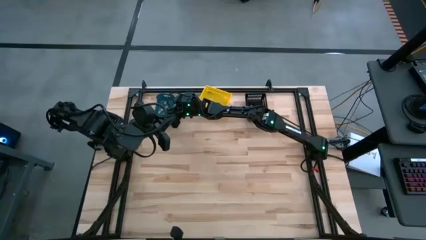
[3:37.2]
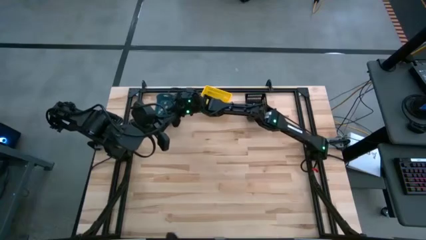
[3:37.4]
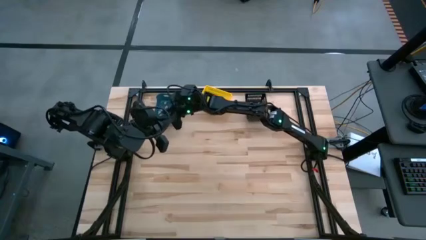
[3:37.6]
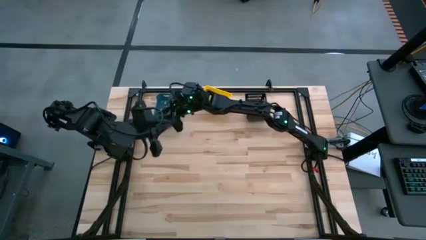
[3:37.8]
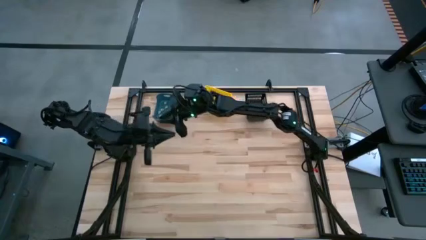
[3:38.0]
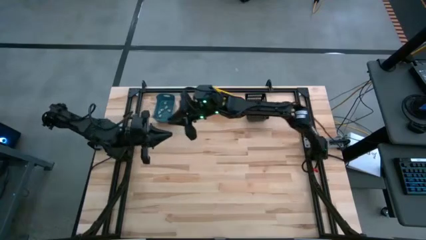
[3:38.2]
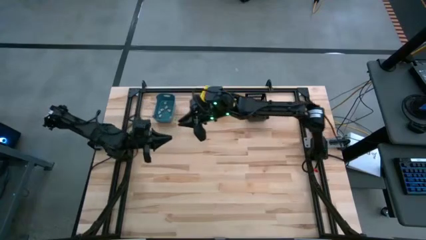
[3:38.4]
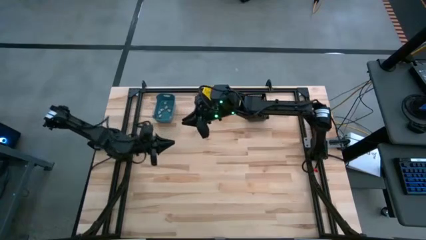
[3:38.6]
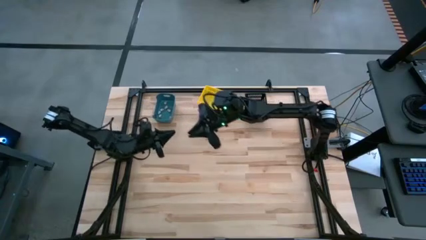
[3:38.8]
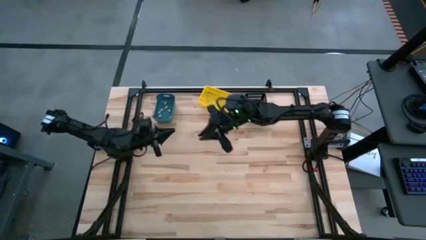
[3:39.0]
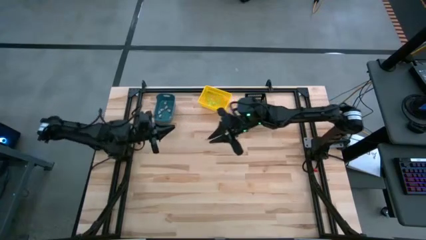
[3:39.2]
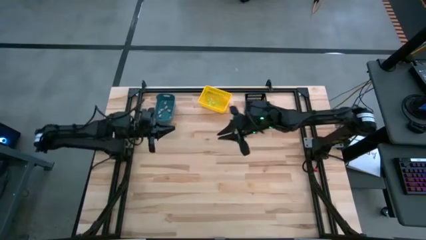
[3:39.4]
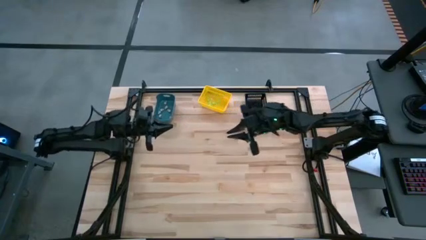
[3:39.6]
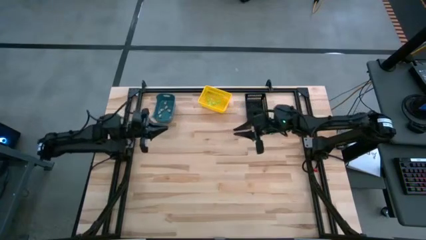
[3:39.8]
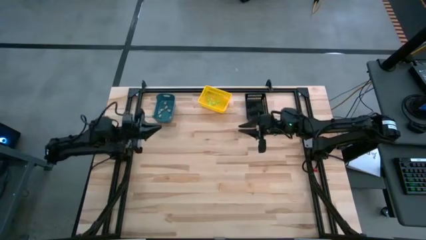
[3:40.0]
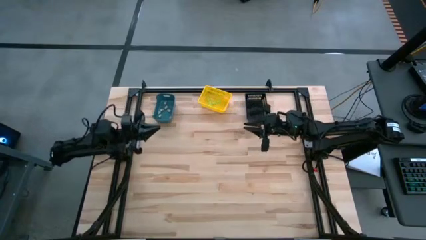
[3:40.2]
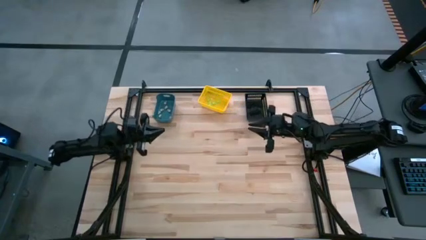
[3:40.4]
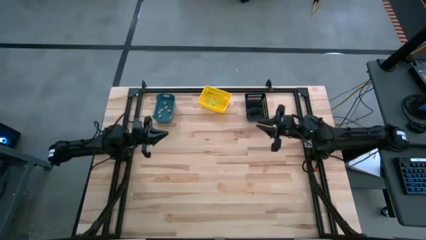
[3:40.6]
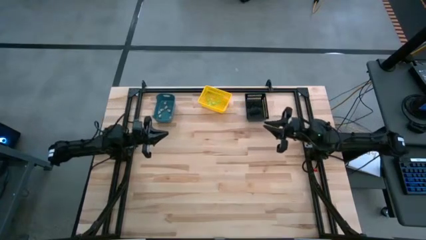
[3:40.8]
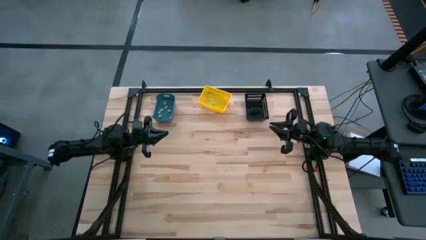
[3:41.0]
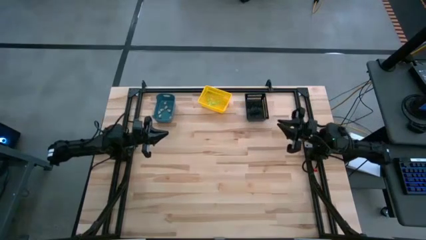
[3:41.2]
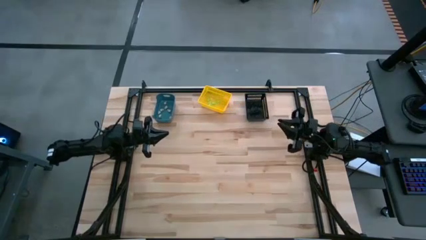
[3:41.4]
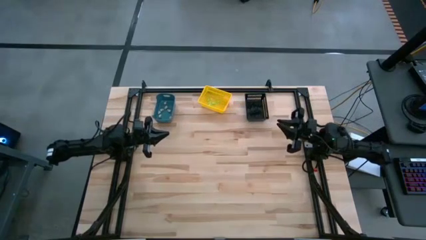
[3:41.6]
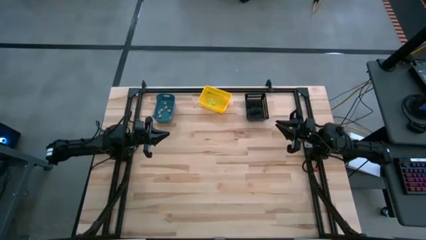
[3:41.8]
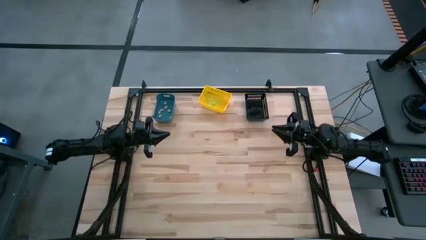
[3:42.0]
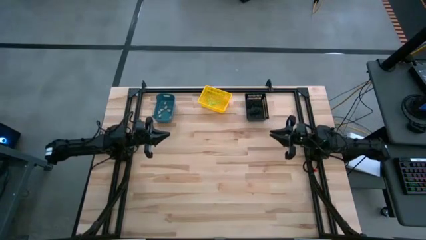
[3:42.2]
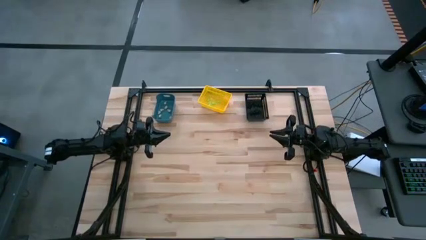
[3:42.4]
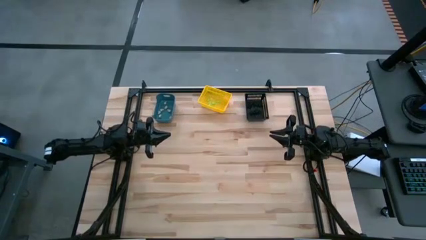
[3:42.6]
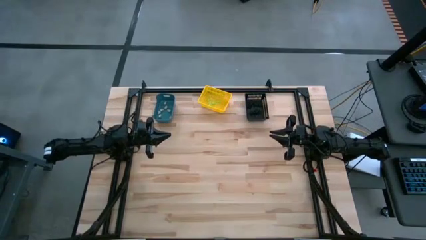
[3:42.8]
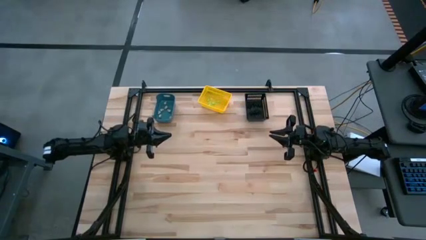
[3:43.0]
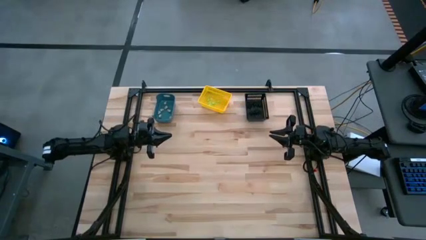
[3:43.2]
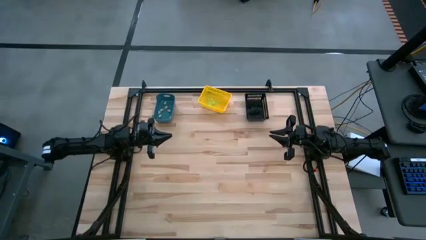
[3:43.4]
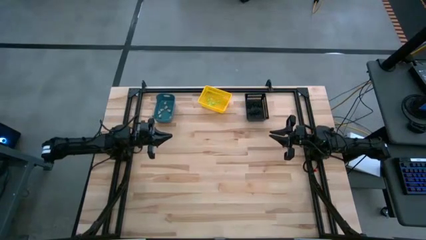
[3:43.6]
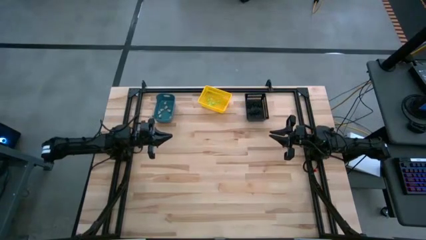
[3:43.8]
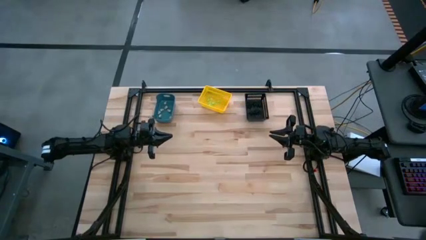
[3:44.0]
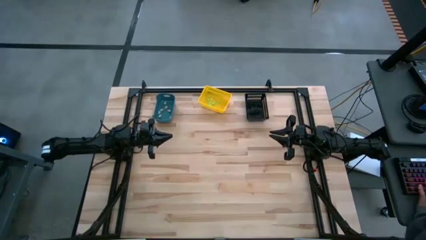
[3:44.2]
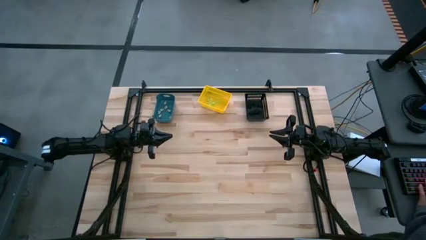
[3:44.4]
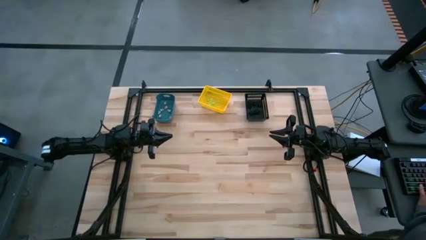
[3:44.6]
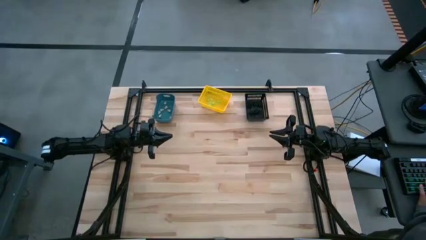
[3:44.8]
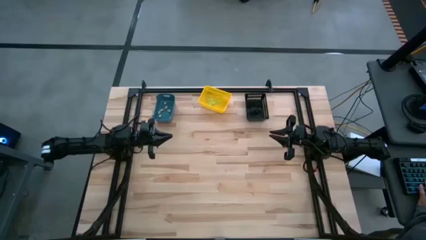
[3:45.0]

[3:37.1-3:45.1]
Task: Sort Halloween decoration
Return to Home Position

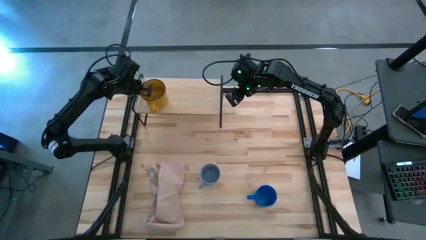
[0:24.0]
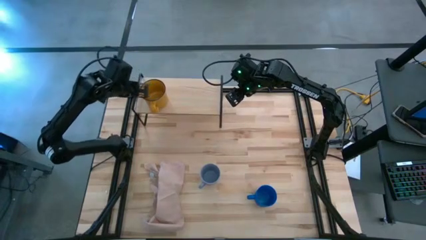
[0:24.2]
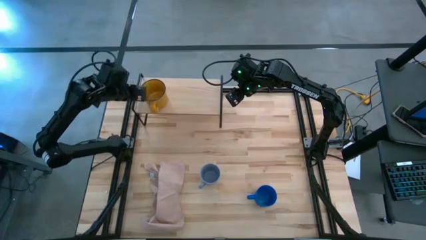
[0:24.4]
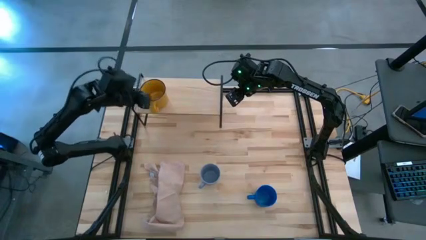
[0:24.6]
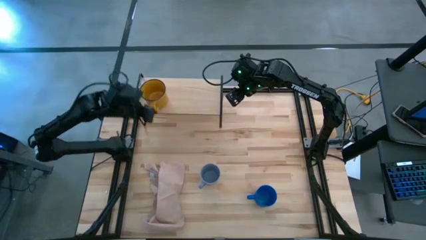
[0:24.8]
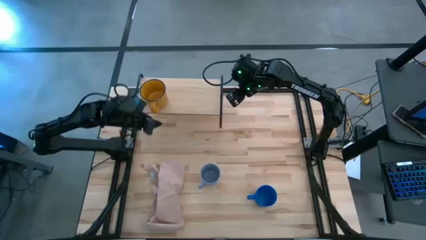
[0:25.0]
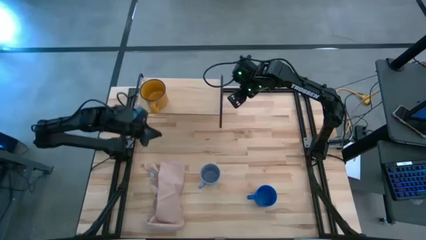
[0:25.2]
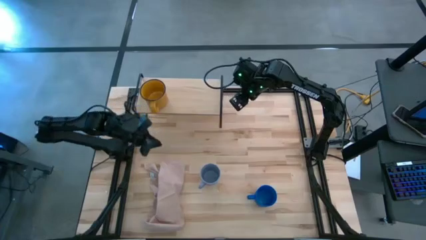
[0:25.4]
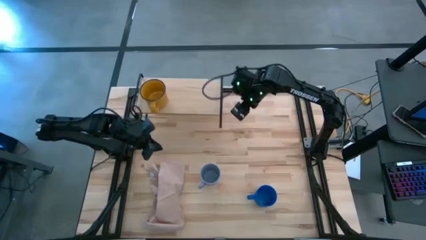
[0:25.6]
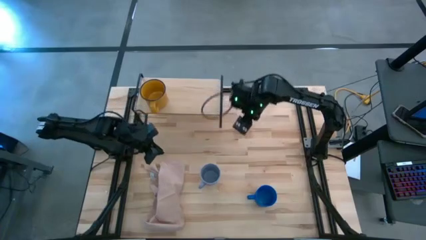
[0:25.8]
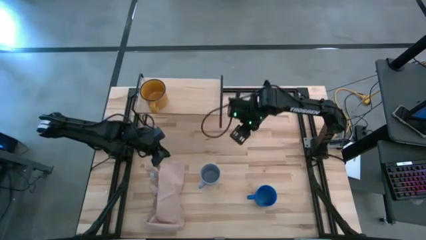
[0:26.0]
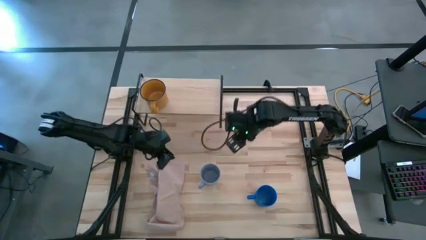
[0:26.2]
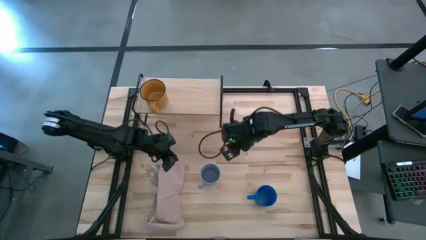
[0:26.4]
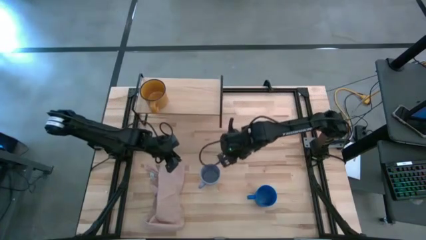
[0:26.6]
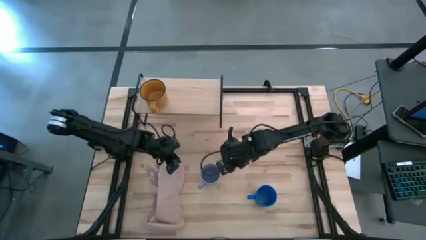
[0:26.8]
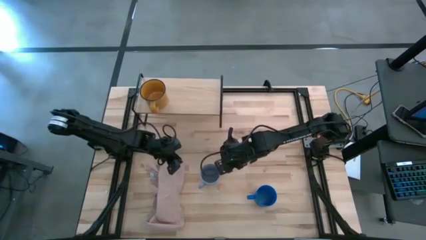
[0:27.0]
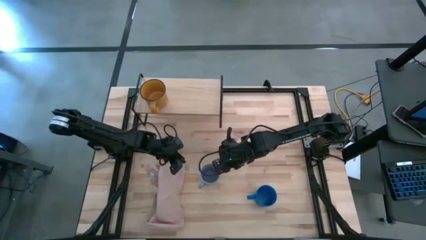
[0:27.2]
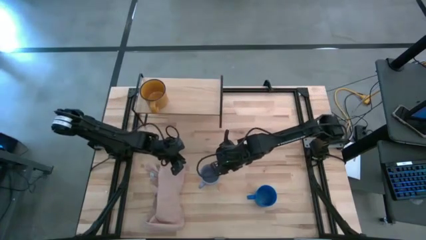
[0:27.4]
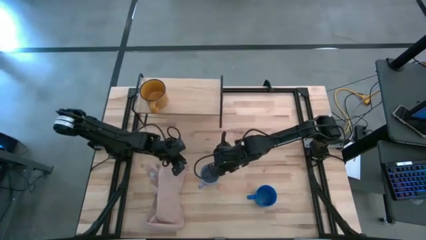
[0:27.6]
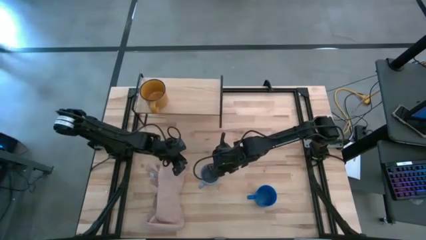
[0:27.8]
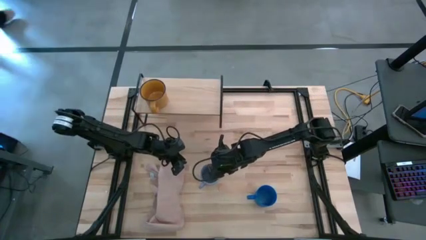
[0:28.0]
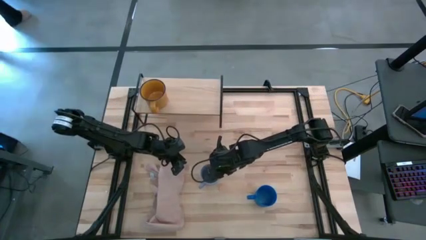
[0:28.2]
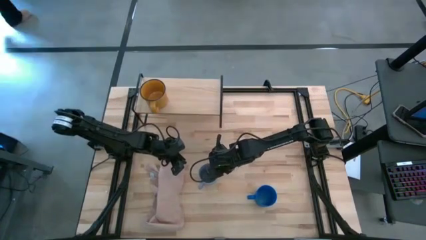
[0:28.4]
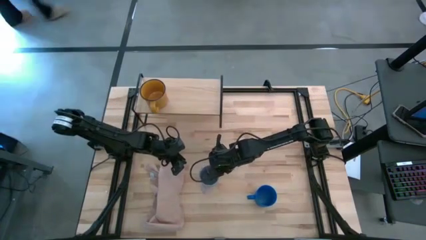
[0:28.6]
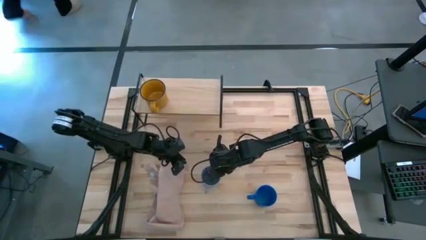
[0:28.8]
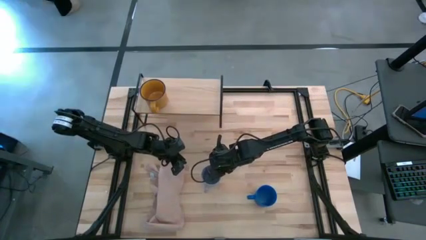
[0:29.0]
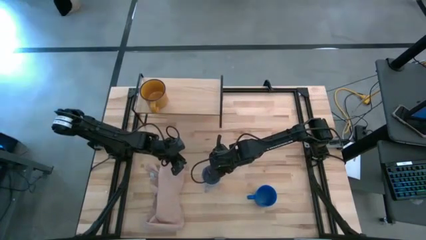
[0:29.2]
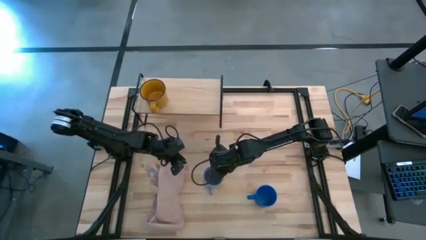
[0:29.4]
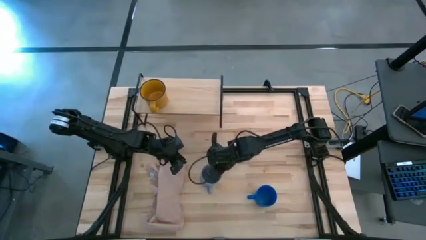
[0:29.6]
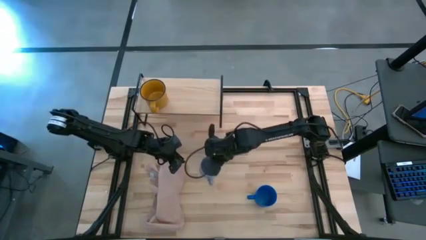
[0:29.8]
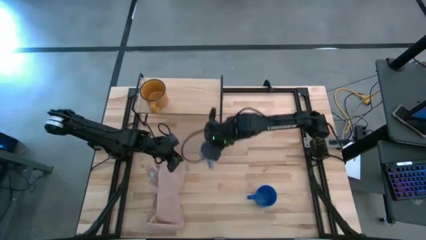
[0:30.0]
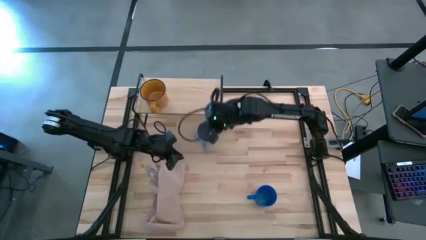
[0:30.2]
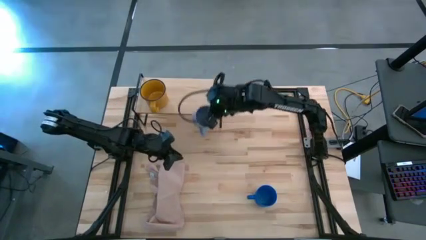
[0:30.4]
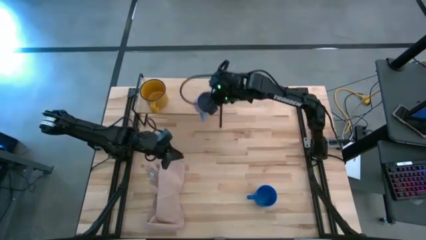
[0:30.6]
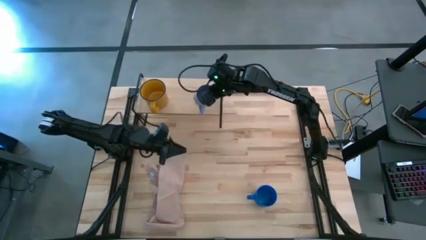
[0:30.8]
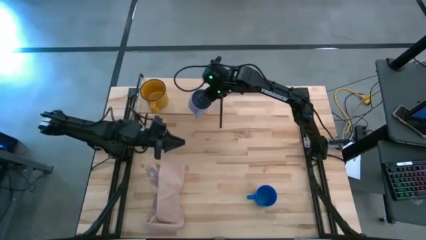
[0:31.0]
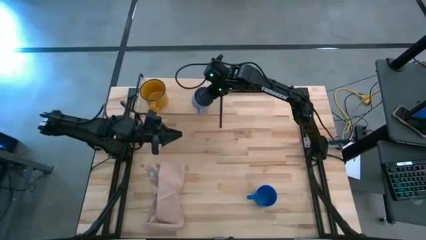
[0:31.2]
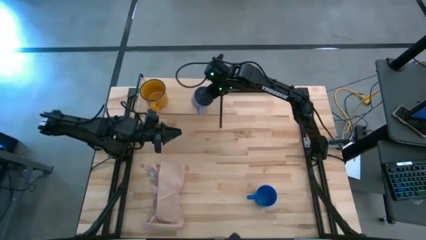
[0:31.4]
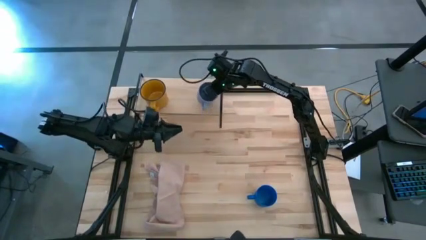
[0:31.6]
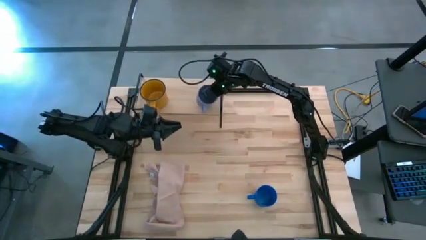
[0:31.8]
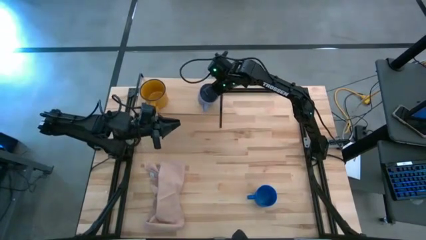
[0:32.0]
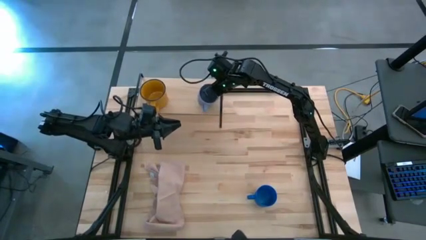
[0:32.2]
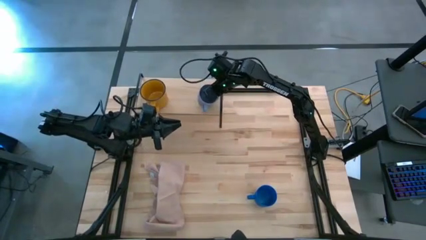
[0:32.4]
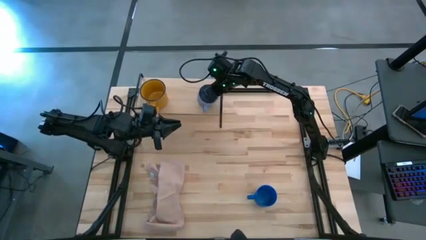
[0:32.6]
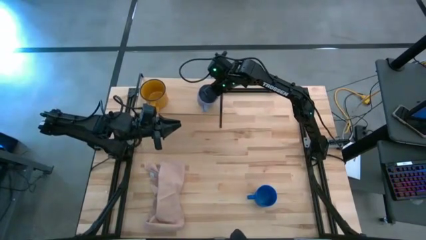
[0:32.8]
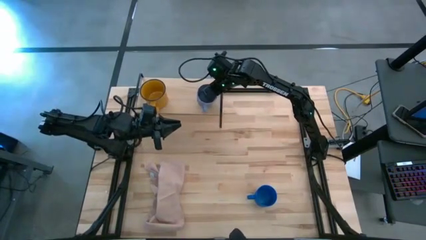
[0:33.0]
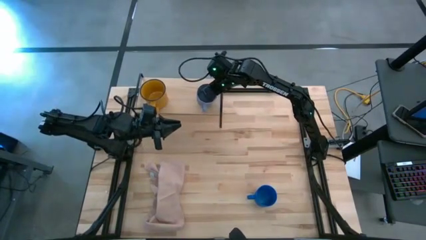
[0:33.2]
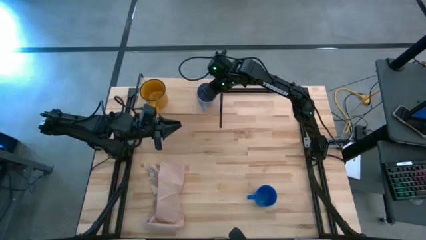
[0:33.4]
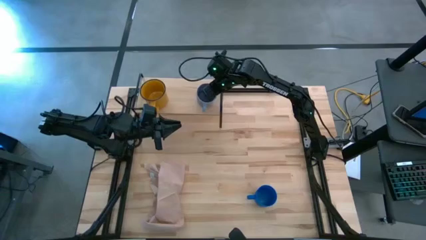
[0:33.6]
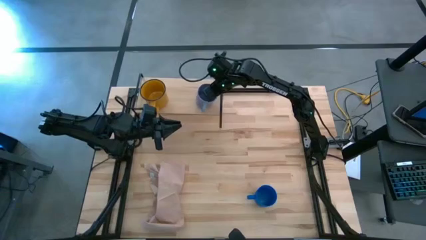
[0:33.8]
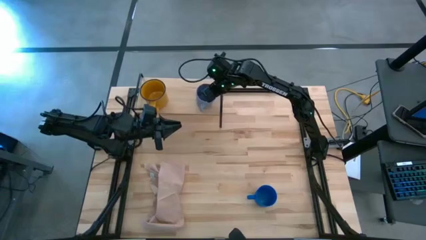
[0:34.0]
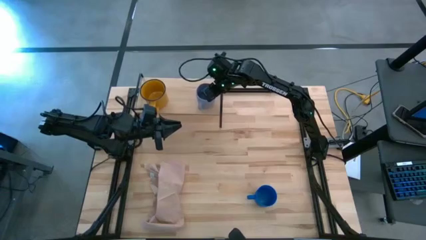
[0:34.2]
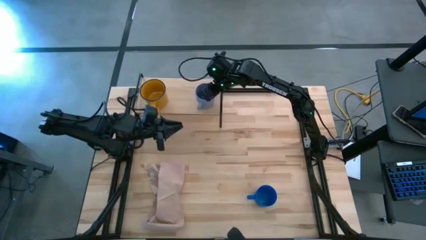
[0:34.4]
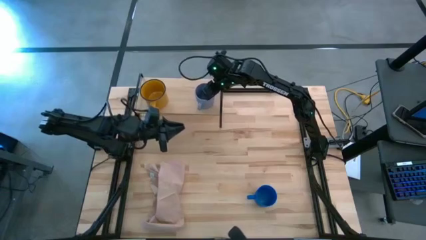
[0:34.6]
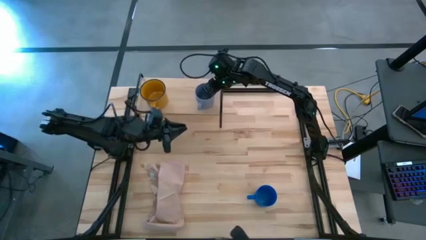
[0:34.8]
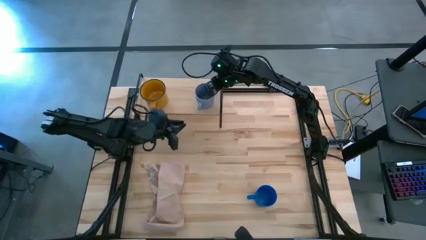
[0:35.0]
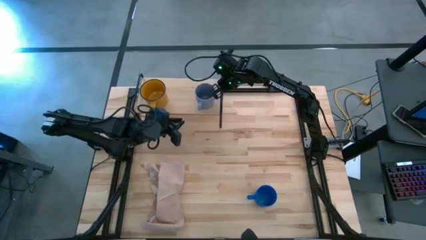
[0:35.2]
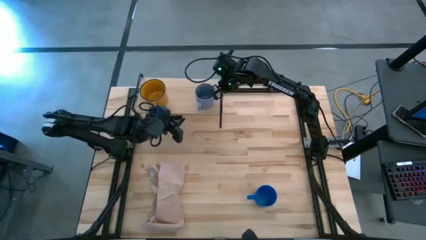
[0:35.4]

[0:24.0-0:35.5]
Task: Stack small to large cups/mugs on shelf
Put the light blue mug on the shelf
